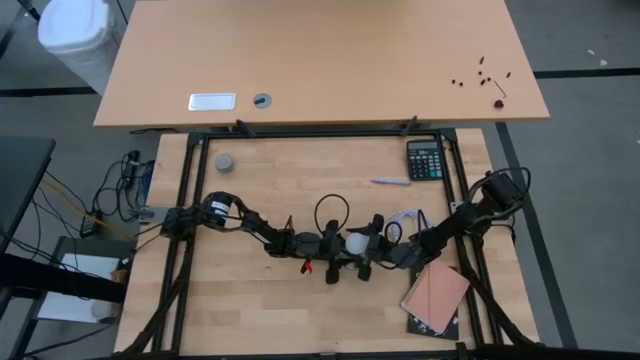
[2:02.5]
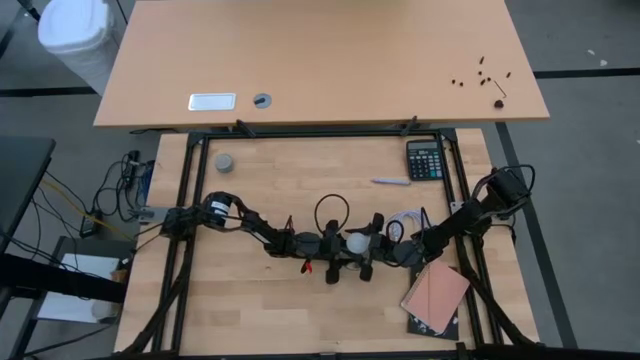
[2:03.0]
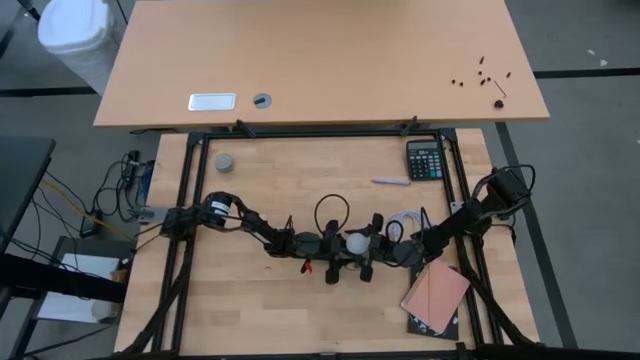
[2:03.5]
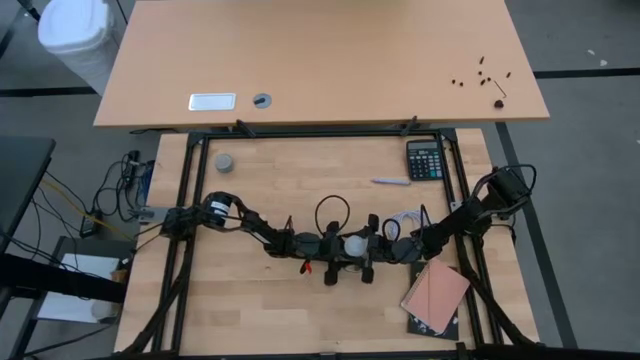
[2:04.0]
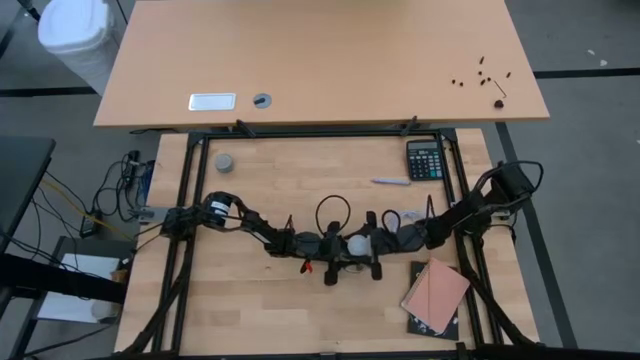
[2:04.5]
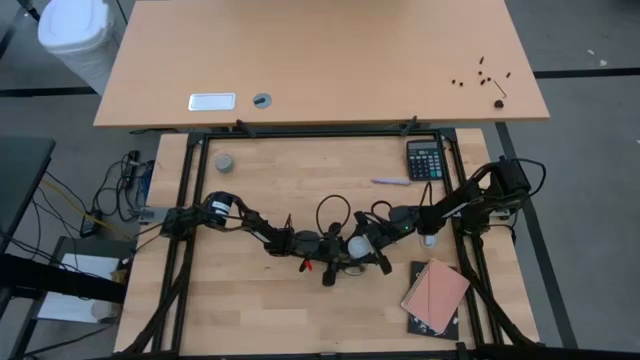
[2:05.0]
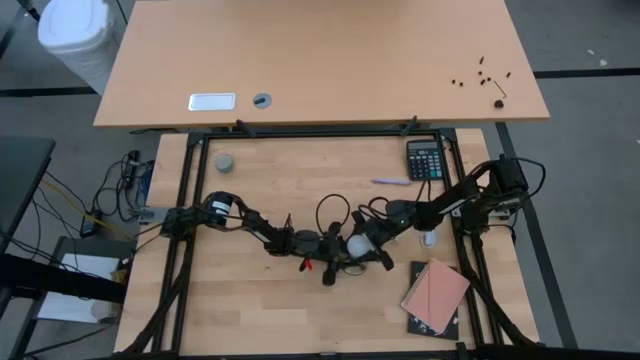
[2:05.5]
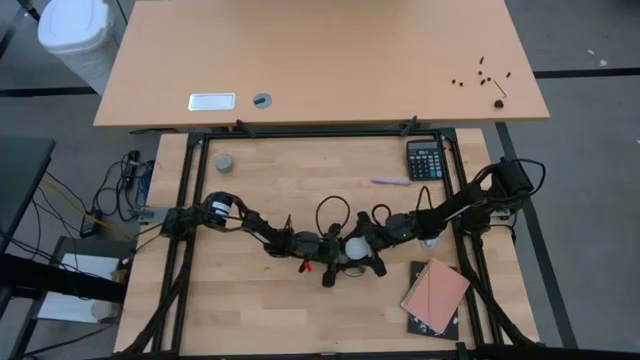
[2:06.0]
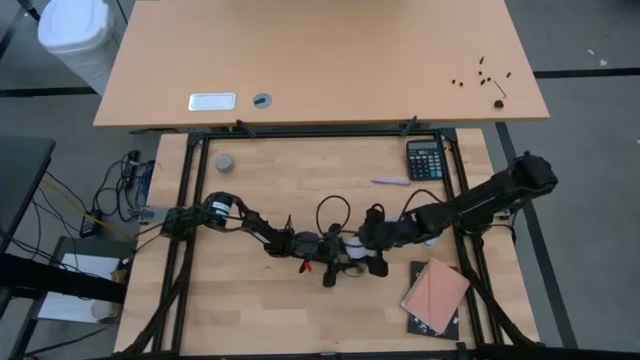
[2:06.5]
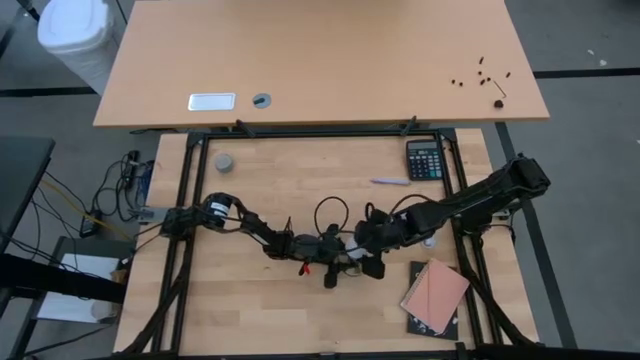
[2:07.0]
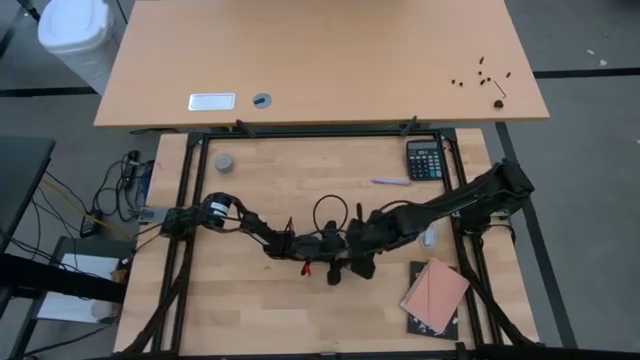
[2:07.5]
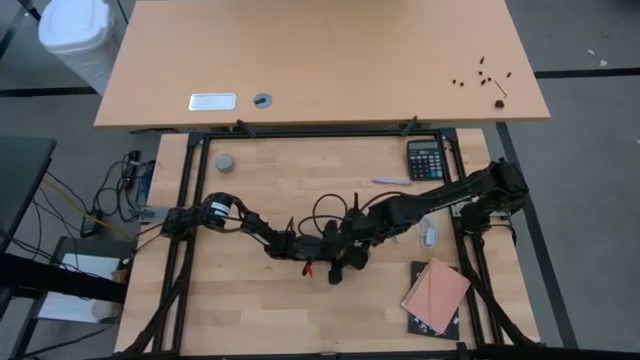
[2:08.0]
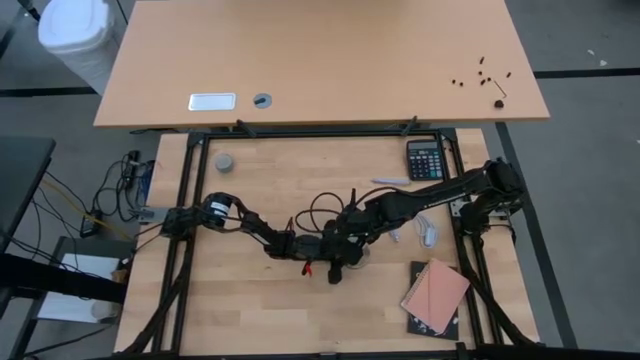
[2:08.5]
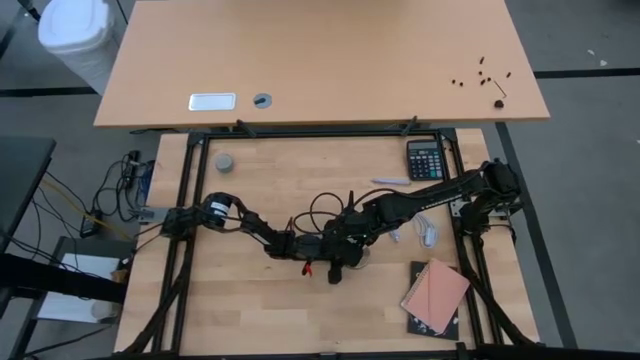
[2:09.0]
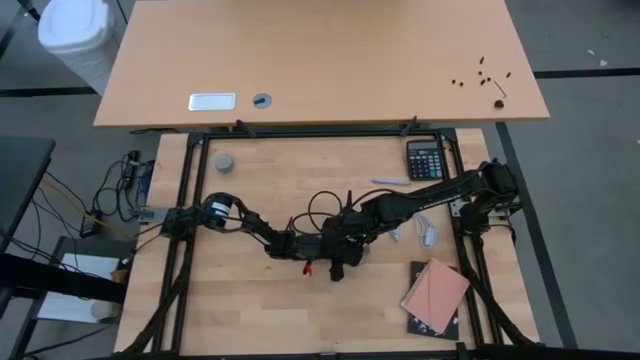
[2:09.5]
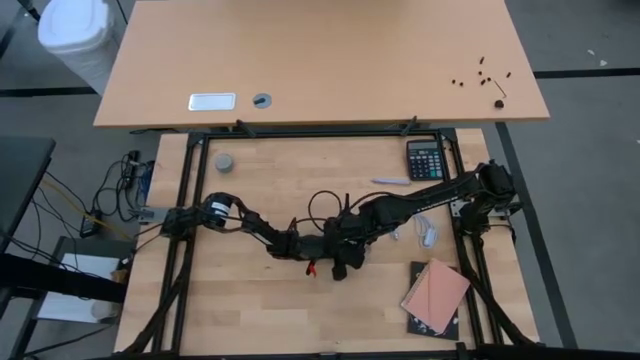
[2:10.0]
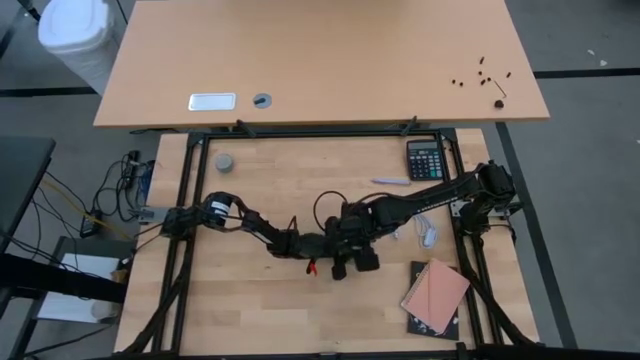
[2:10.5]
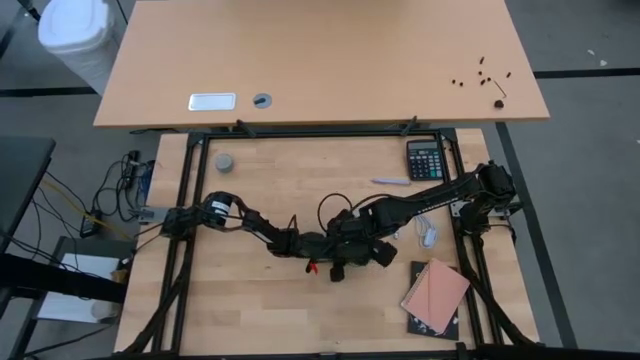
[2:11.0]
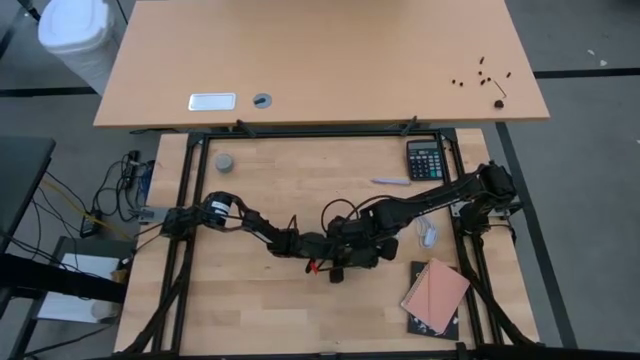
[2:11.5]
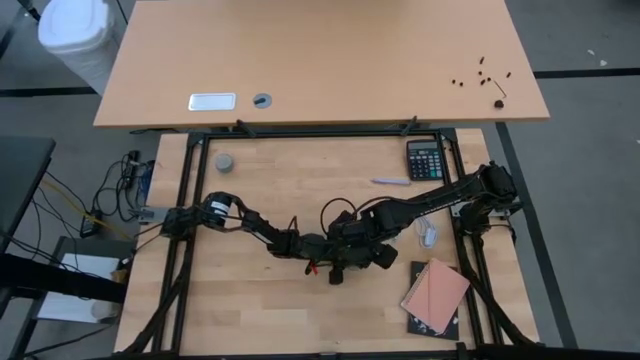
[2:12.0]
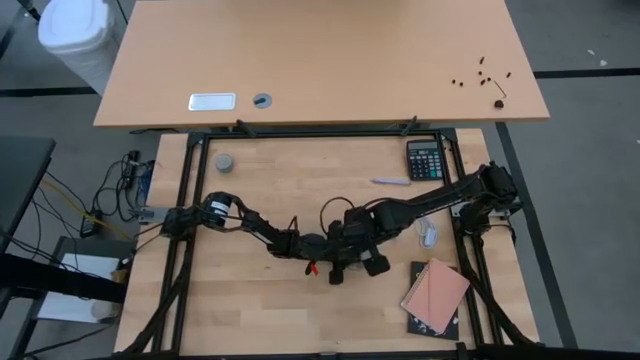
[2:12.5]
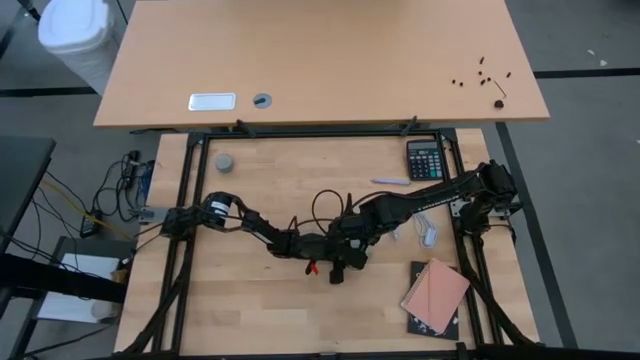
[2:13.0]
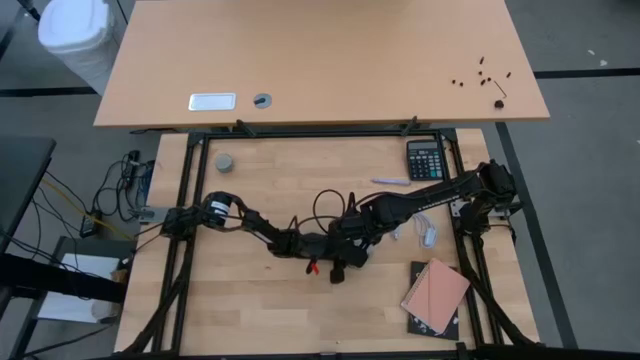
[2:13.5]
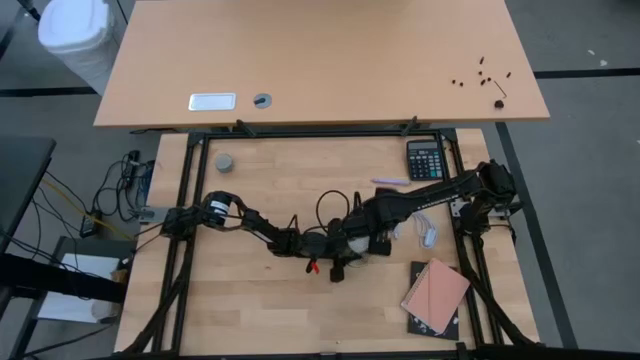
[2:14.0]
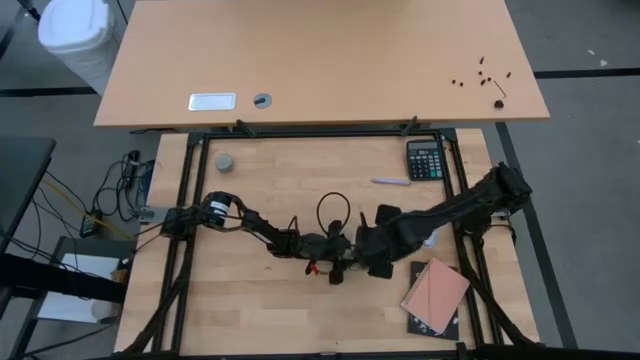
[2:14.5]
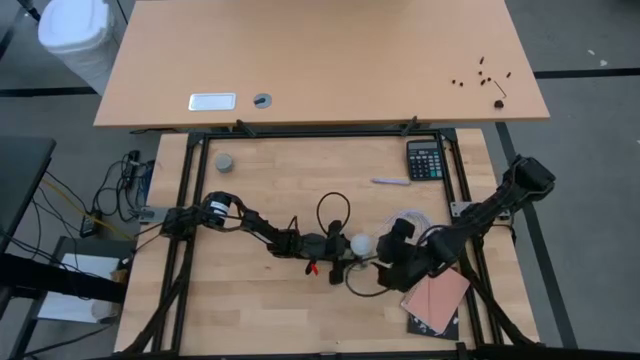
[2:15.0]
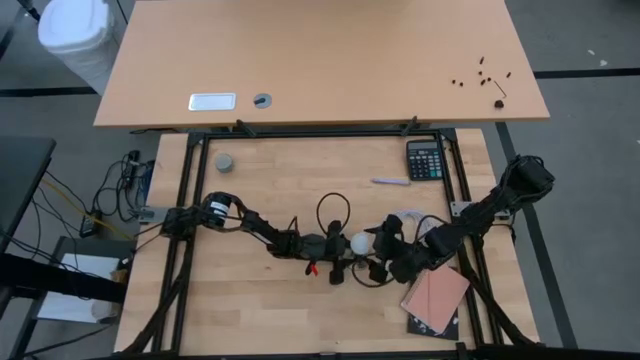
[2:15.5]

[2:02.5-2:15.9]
Task: Screw lightbulb
Remove the lightbulb from the bronze lamp socket

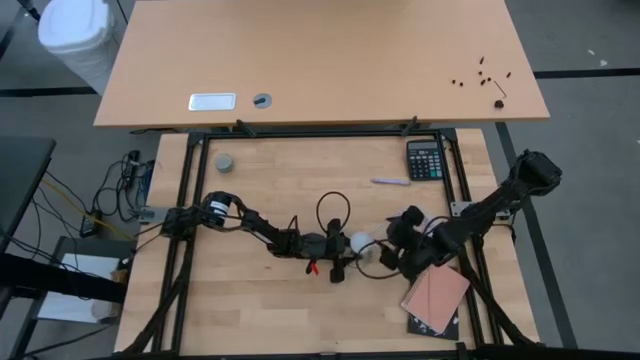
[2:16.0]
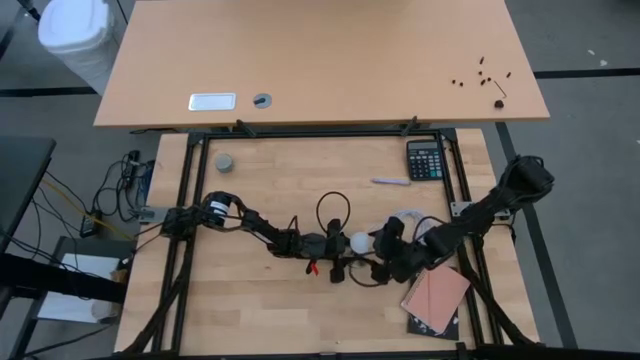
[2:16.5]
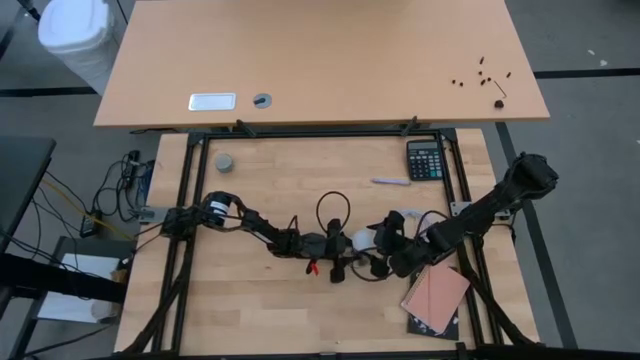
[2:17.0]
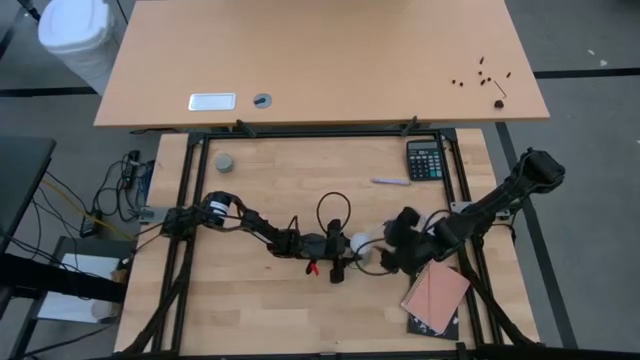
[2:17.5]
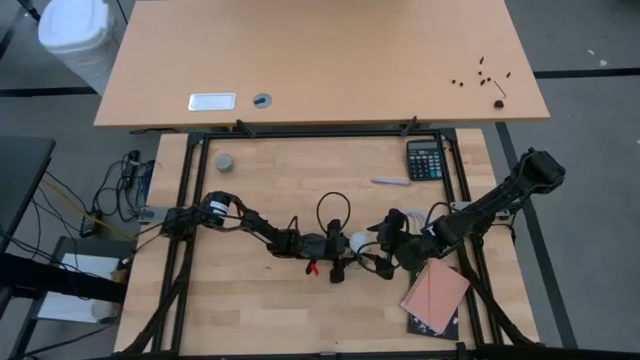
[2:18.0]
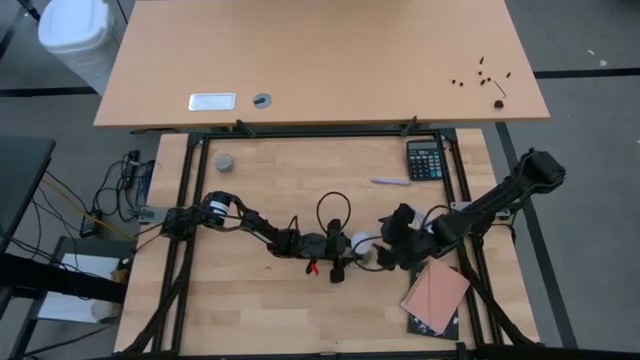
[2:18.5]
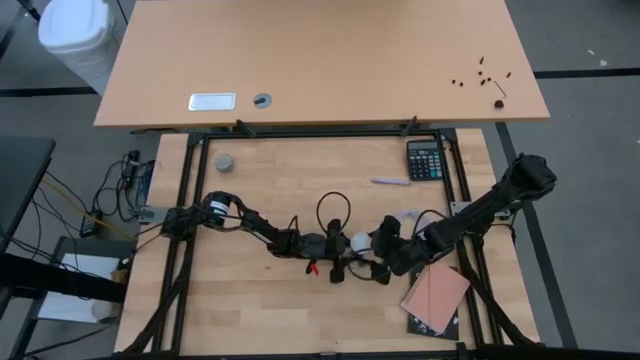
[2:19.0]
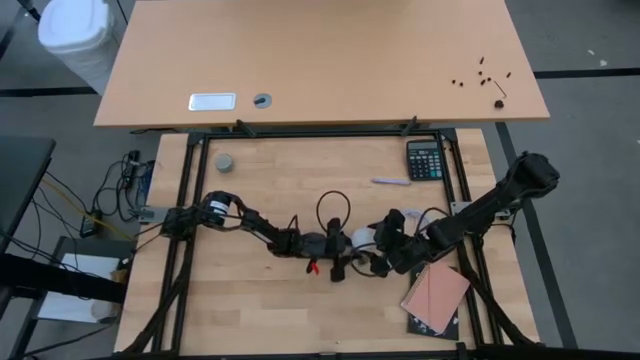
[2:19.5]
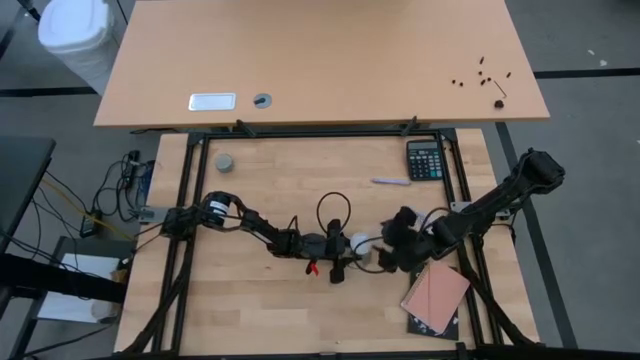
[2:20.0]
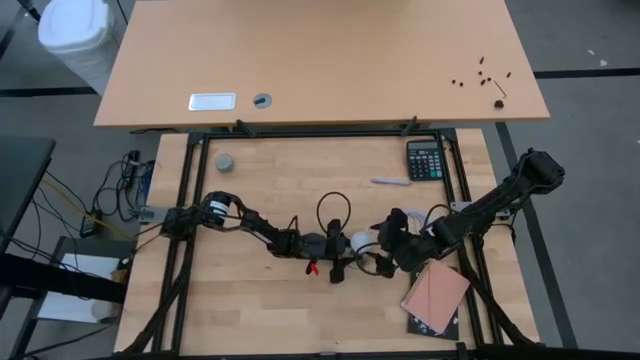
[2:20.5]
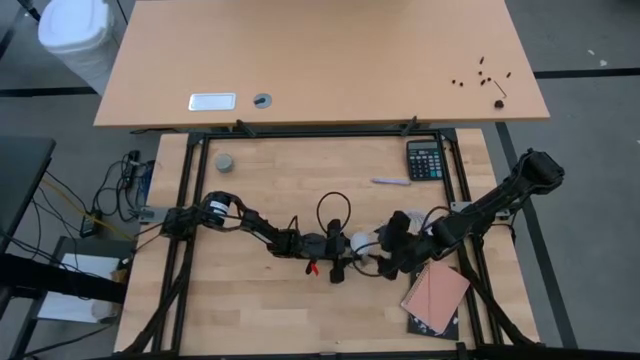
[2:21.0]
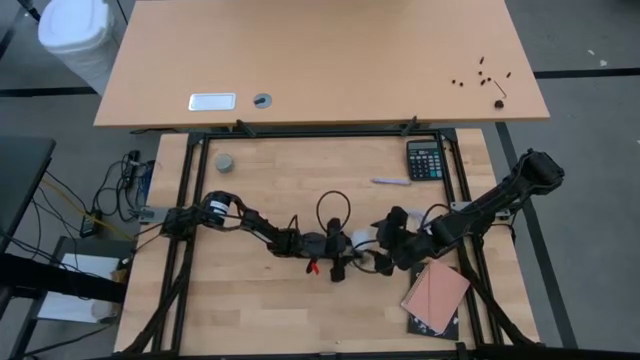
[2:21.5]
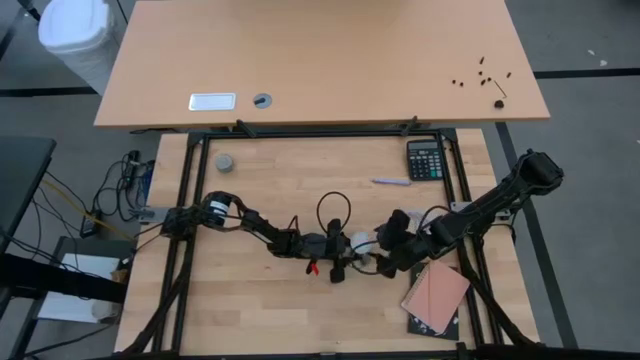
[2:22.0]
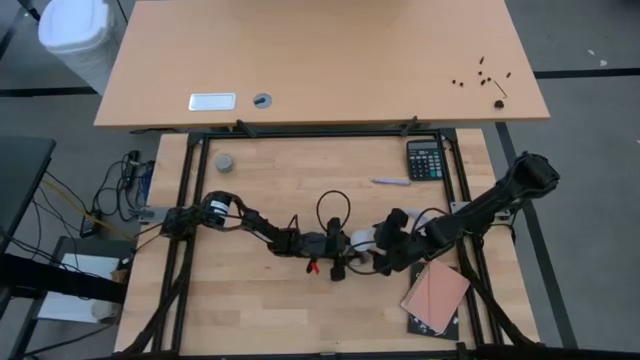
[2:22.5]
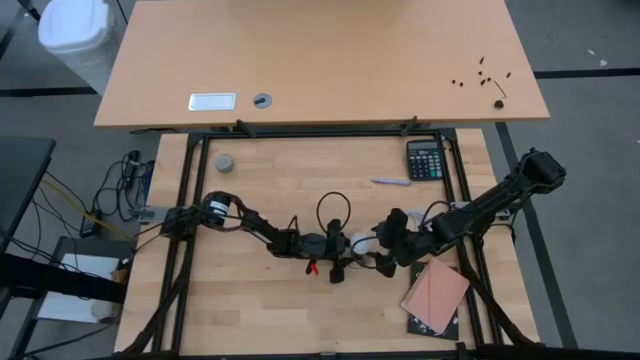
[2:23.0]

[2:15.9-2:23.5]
Remove the lightbulb from the bronze lamp socket
